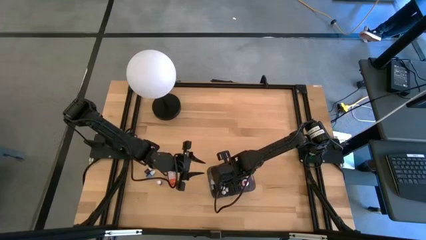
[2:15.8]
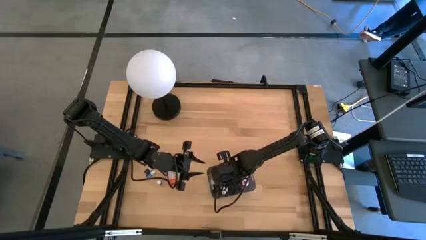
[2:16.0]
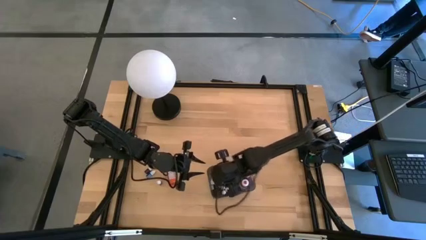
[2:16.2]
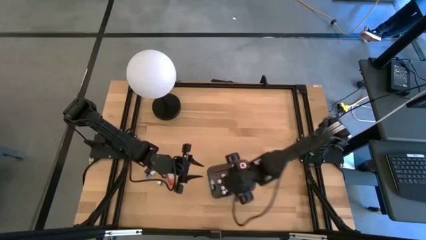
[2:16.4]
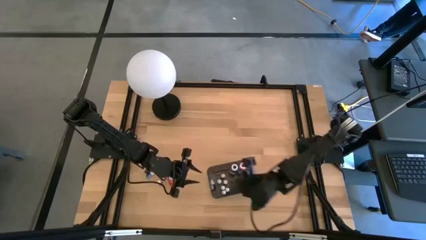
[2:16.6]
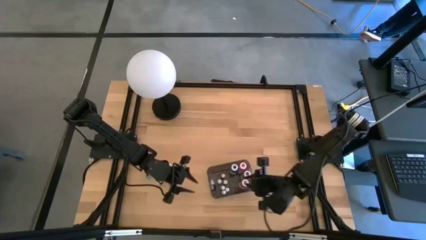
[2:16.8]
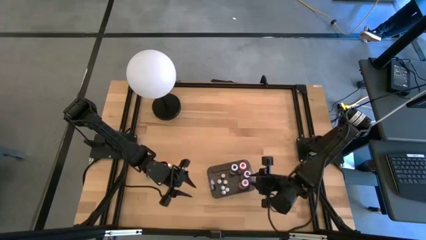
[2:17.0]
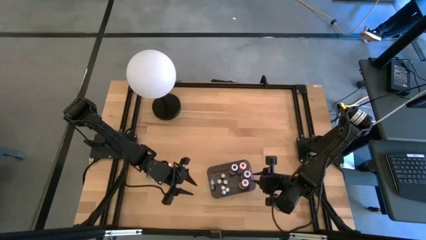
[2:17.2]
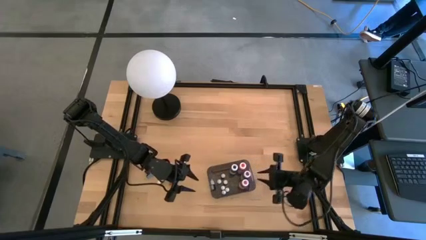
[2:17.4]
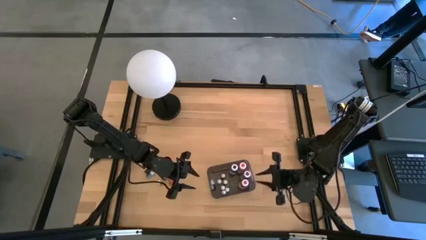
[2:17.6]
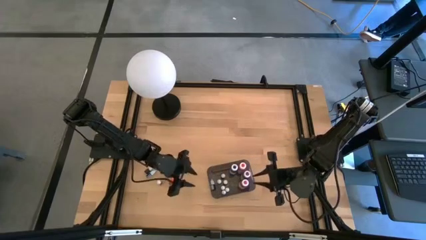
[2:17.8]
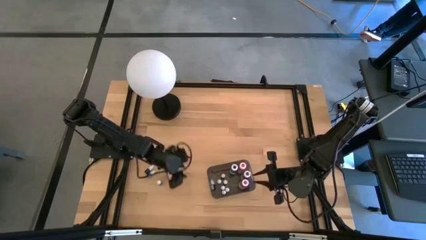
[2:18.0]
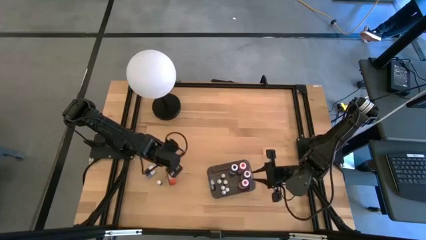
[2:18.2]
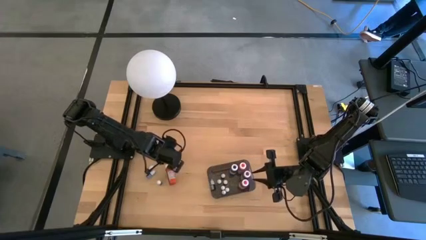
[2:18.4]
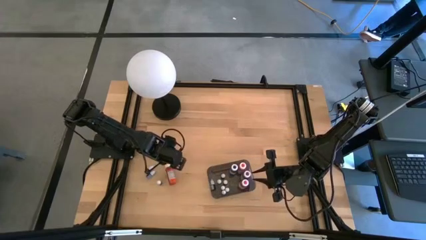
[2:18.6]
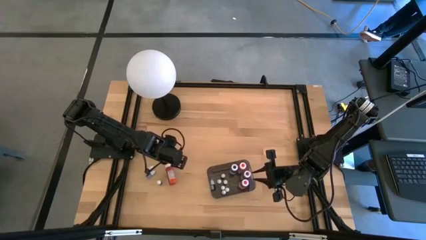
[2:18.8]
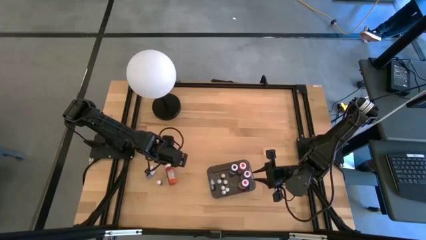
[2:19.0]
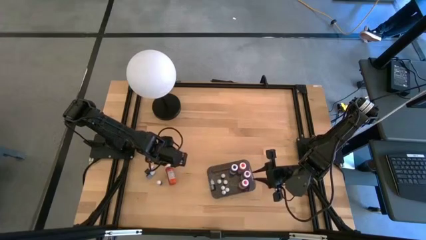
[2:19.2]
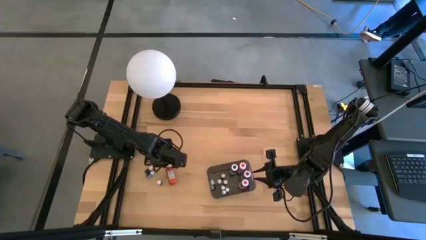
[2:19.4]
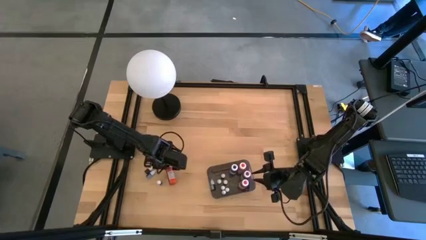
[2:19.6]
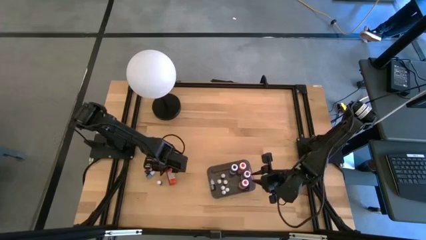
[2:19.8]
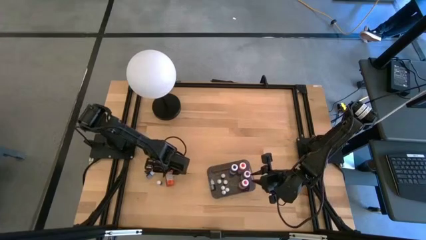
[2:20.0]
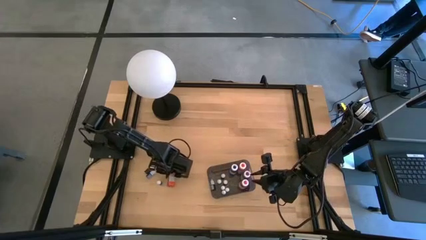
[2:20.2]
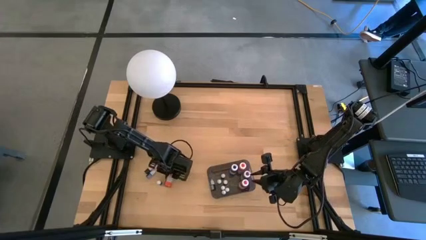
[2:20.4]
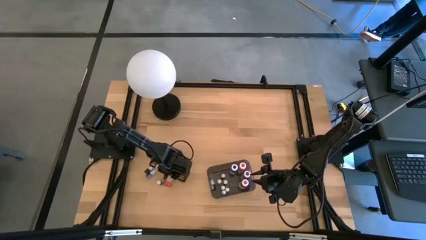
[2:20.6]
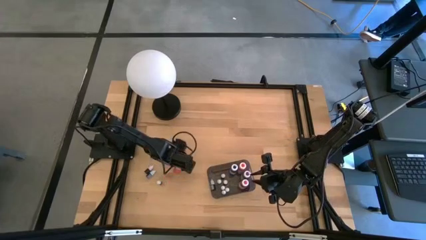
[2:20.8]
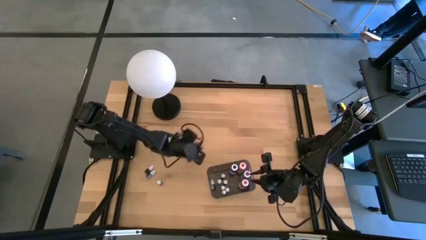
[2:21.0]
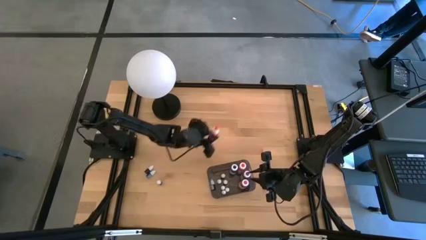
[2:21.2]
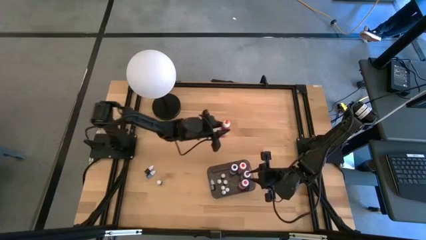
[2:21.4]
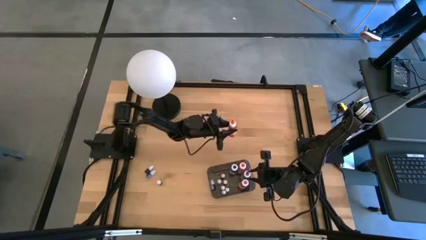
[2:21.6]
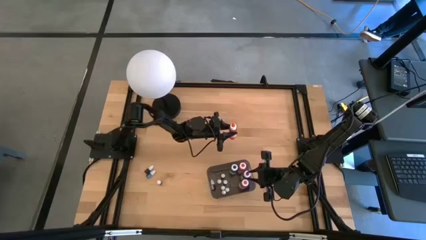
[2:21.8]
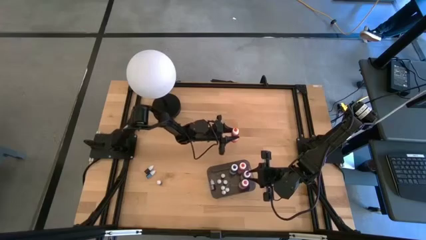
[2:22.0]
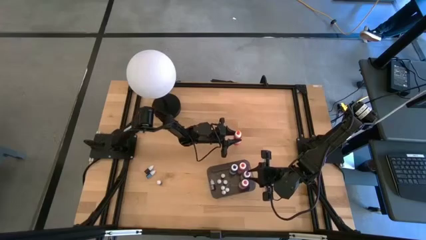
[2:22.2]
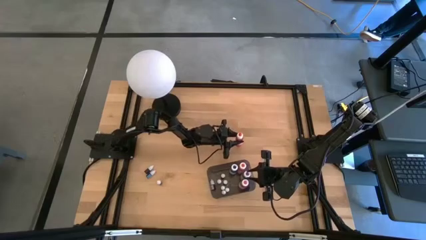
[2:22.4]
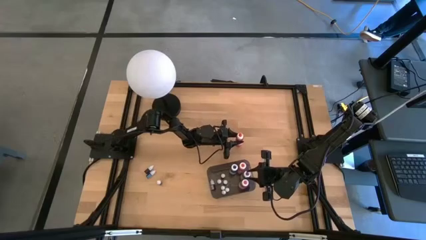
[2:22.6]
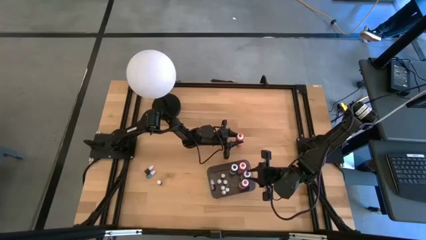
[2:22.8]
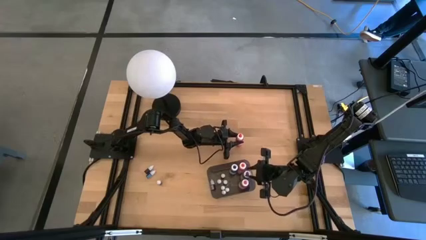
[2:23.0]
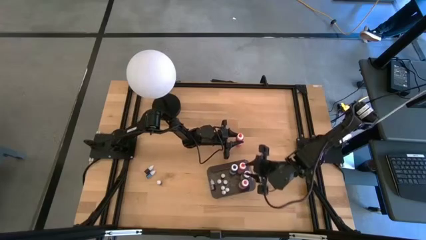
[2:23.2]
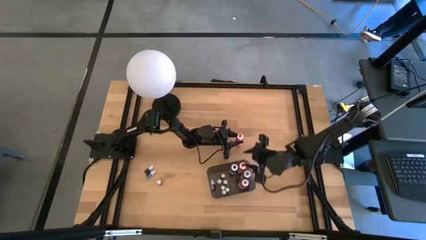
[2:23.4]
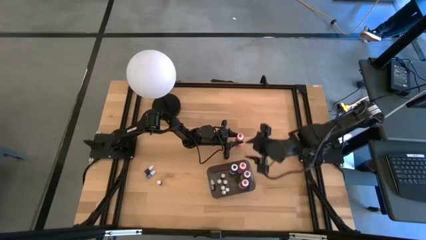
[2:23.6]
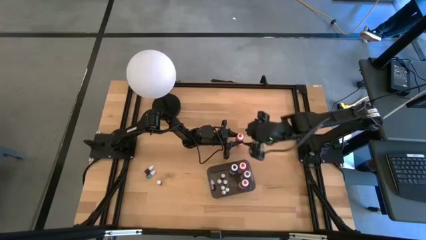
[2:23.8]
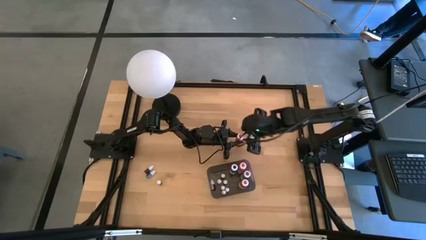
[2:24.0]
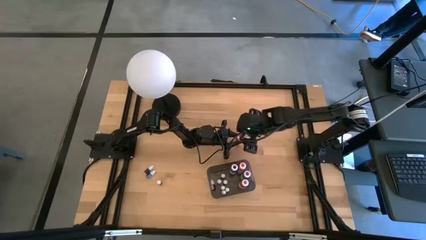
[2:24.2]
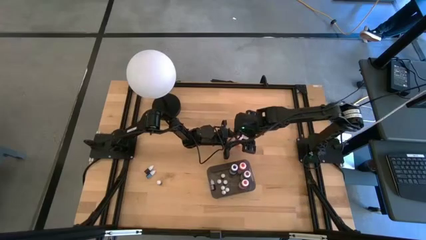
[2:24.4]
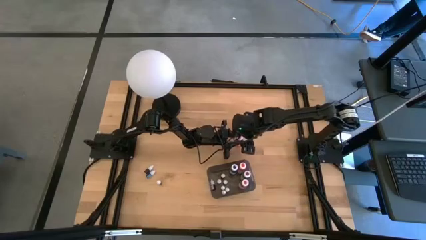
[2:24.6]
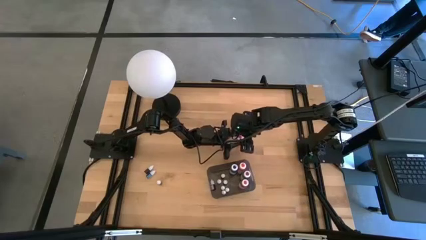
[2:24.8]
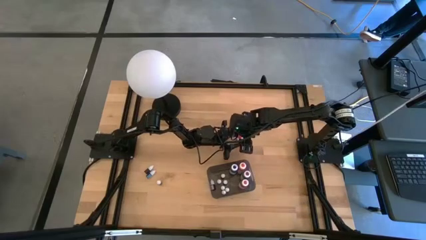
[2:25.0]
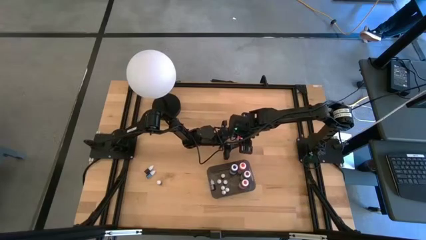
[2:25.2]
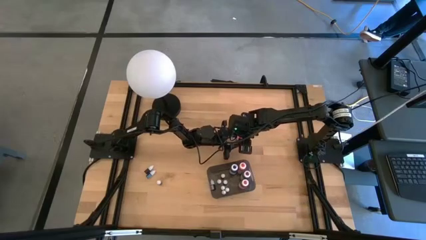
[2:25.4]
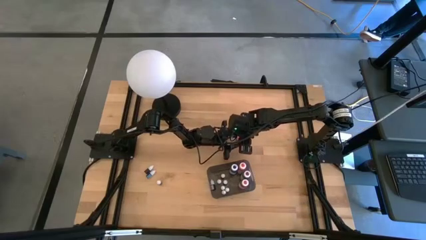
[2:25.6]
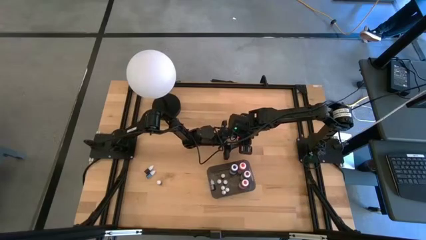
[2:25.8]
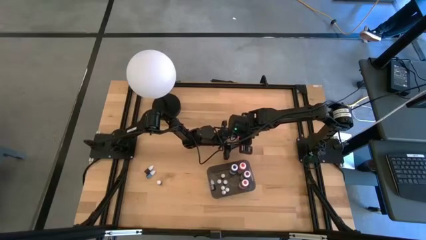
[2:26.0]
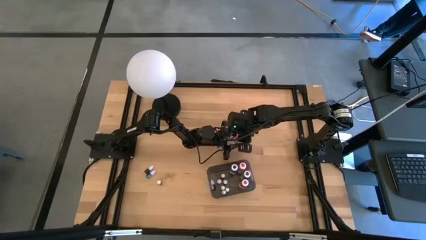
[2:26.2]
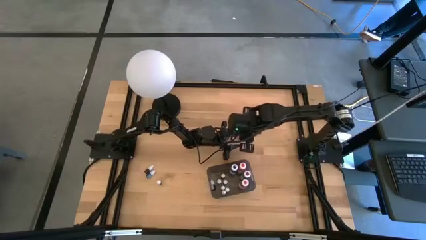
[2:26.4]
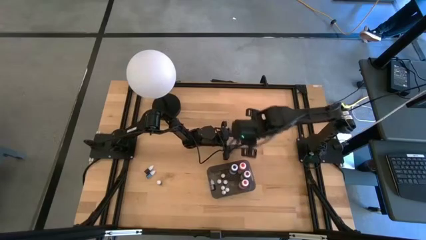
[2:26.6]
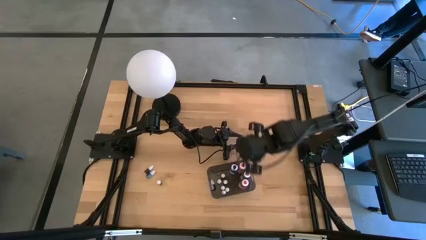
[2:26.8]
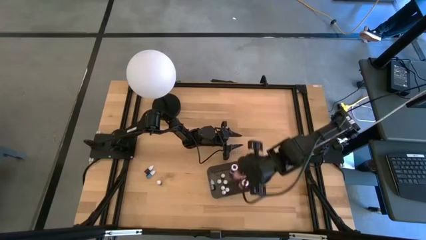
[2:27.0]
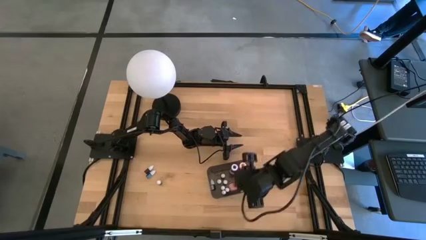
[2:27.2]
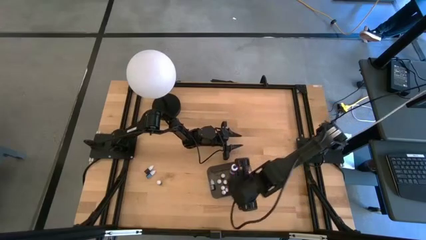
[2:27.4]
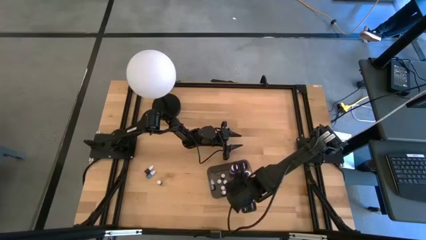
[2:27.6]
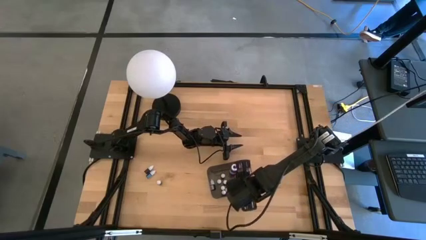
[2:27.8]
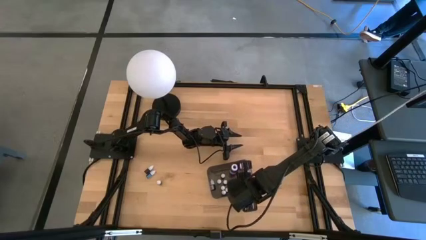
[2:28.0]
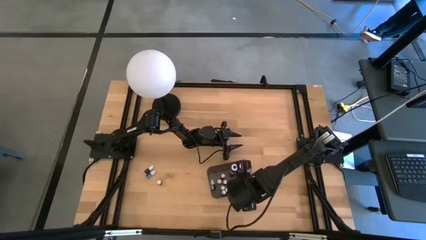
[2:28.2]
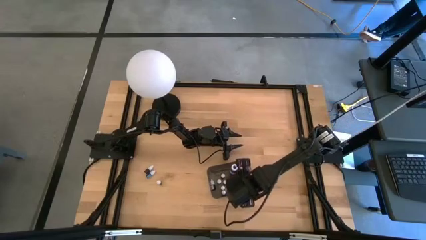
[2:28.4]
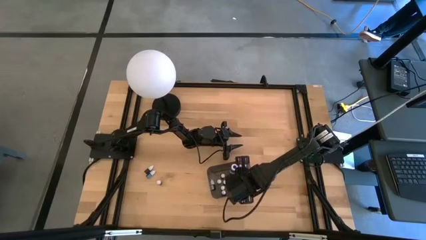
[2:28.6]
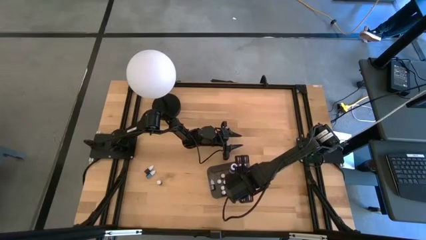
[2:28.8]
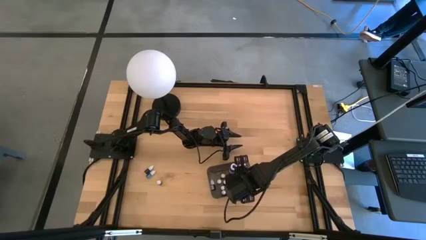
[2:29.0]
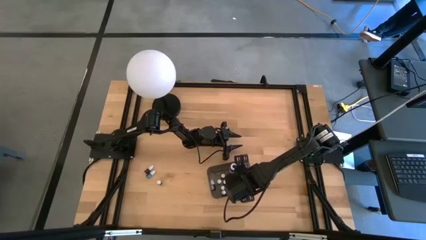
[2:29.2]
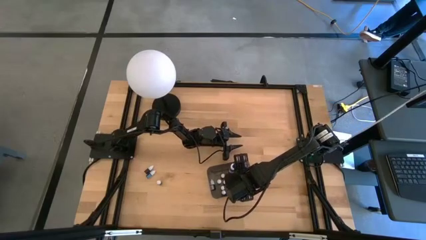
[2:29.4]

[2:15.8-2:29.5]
Task: Pick & Place food coloring
Put the large orange food coloring bottle into the bin

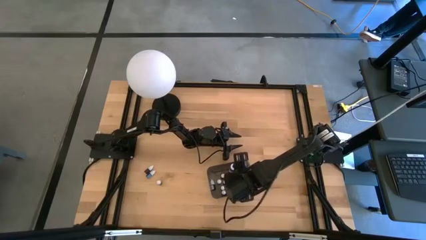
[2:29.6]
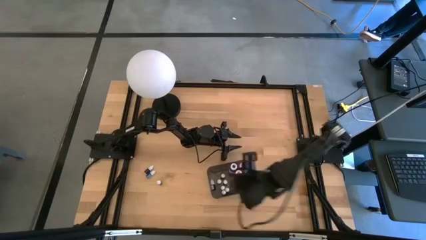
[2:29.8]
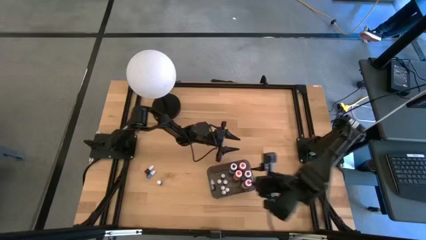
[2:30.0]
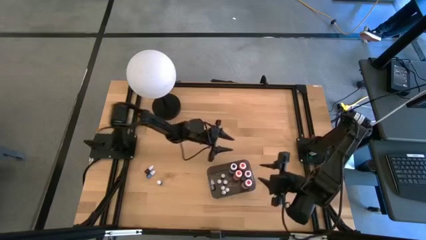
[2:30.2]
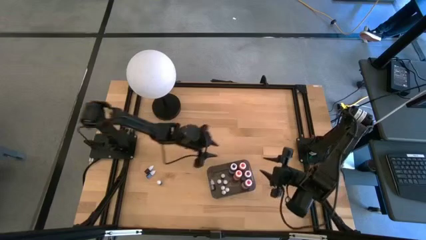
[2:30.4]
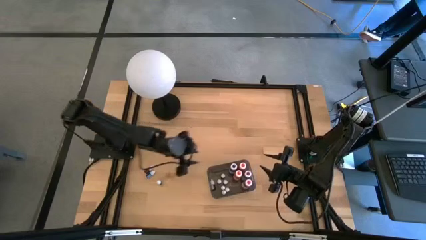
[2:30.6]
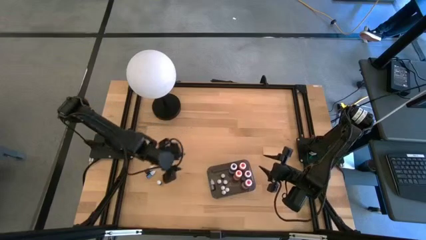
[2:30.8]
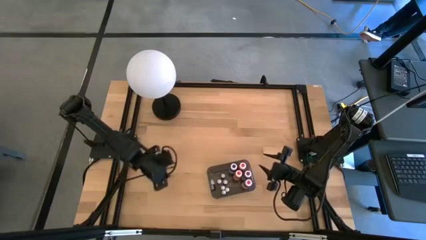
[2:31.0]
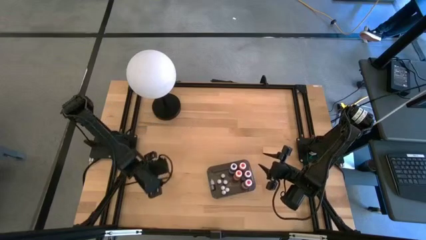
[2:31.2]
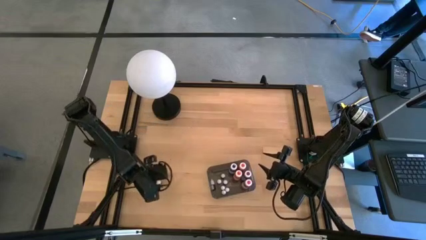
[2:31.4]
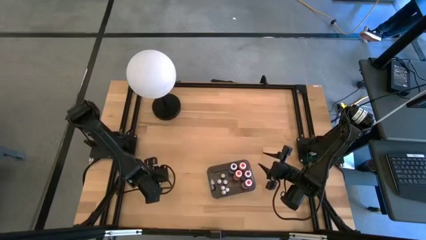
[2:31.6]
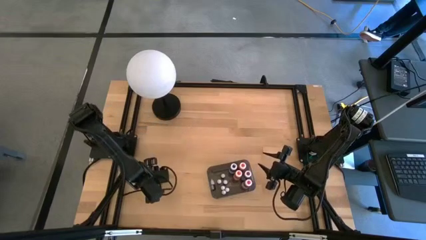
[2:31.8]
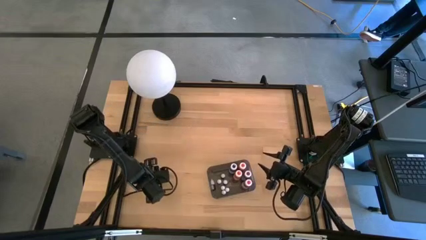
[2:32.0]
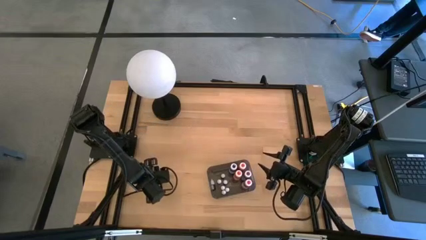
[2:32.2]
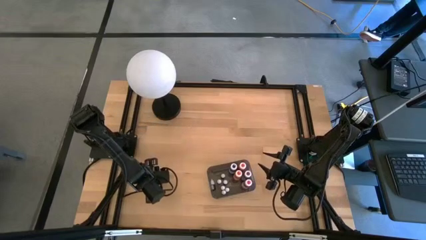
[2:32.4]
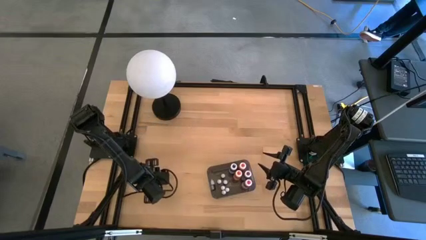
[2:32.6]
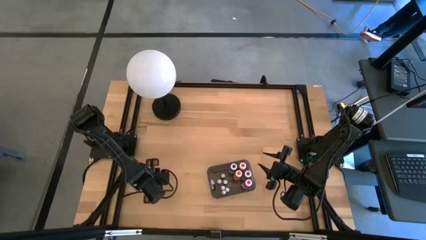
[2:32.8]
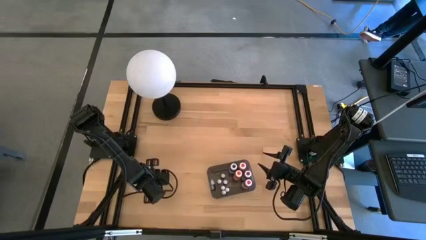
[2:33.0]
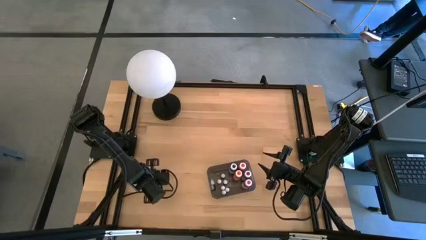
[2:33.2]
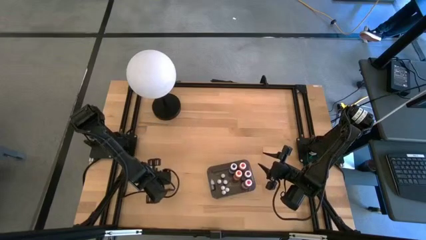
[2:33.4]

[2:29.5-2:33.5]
Put the small food coloring bottle into the black bin
